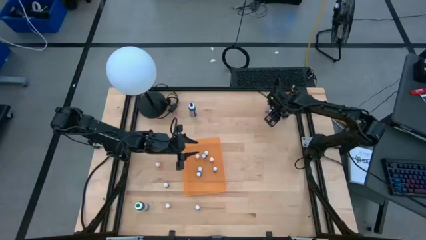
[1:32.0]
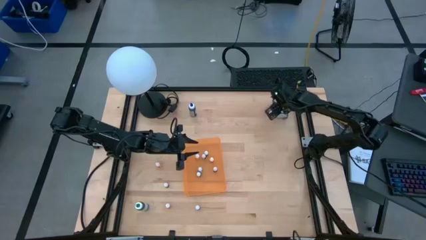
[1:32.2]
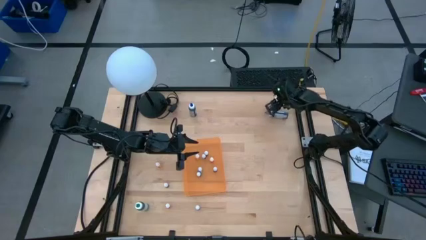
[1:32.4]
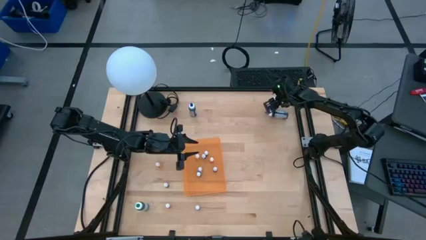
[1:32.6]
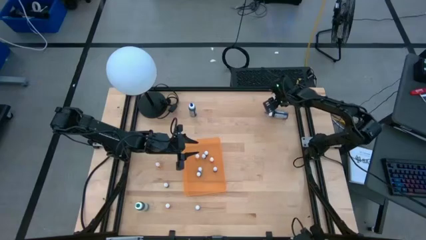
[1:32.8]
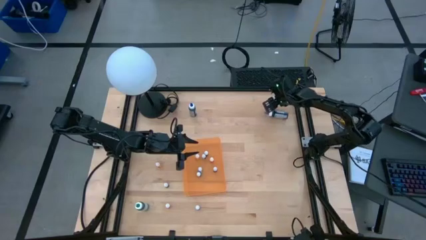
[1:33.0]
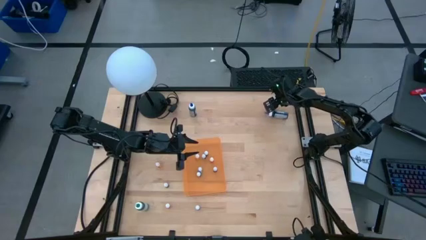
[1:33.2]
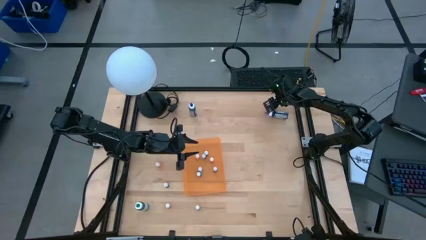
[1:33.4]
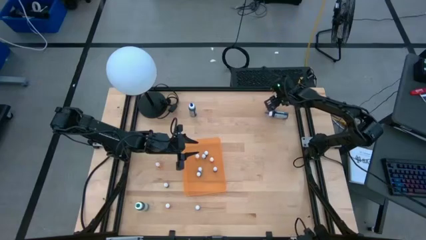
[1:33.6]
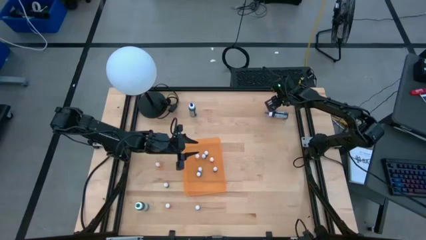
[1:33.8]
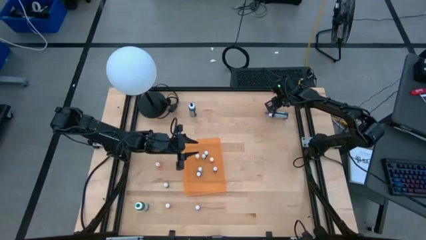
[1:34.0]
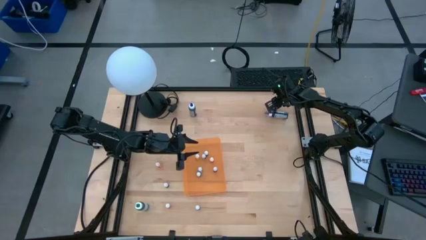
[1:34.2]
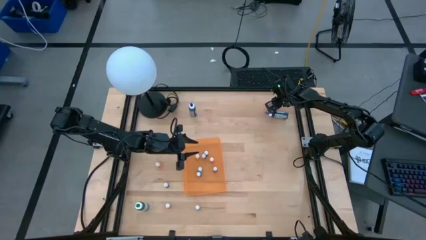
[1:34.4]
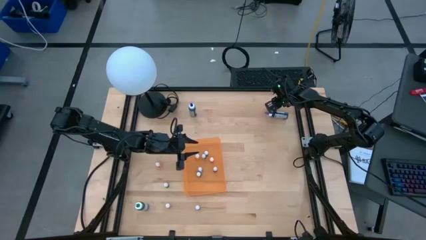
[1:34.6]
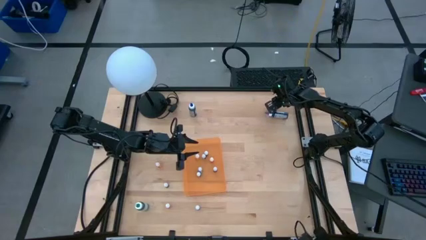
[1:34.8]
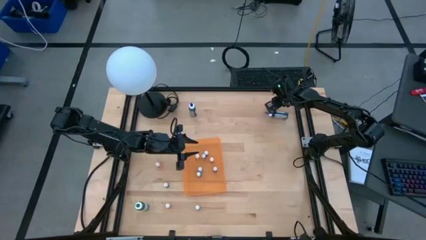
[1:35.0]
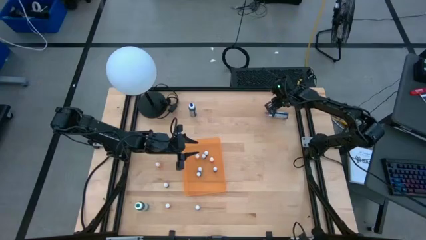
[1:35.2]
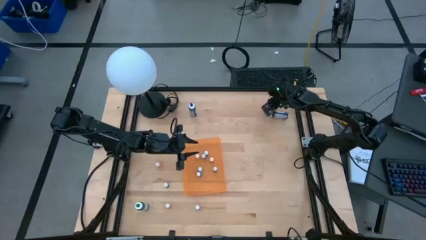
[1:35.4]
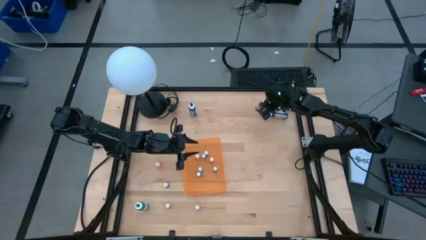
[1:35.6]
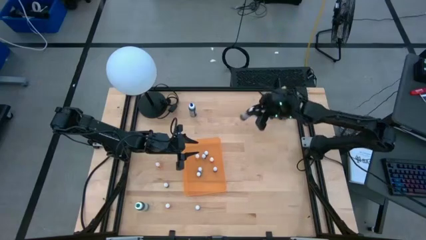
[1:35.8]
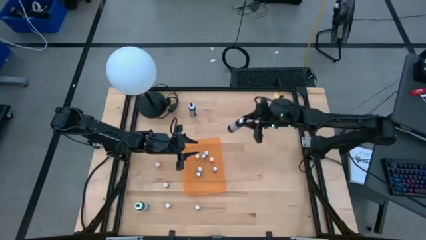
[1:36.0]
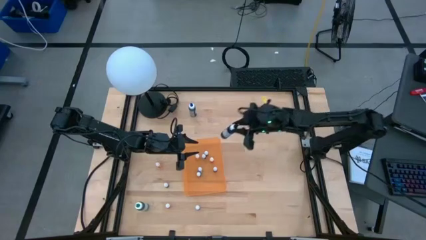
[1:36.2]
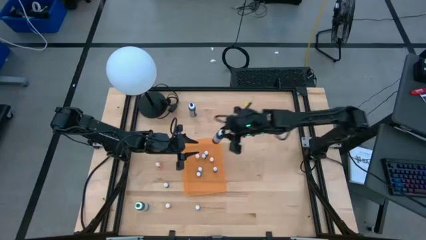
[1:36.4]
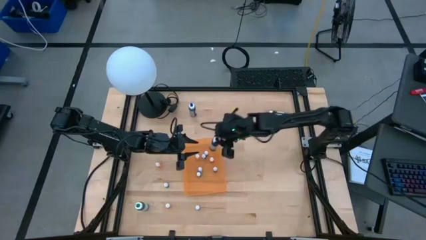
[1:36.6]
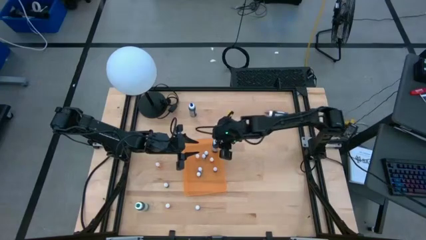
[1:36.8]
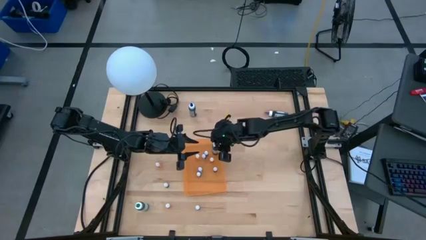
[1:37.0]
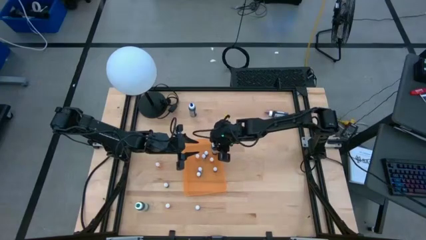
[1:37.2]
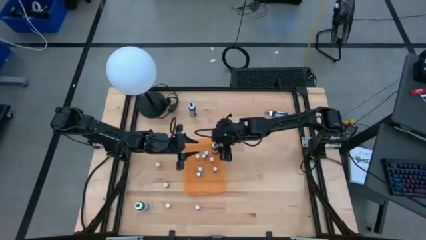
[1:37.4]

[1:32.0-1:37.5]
Task: Pick & Place food coloring
Put the large black food coloring bottle into the orange bin

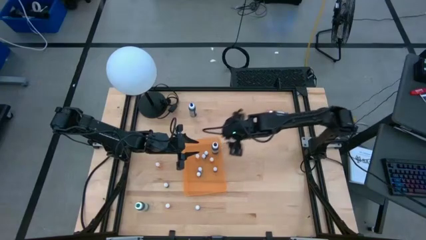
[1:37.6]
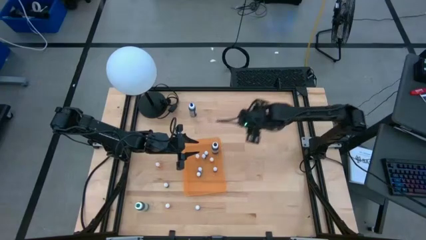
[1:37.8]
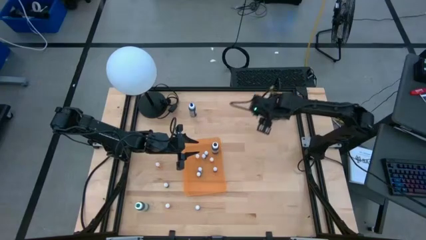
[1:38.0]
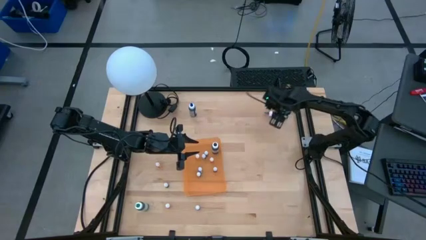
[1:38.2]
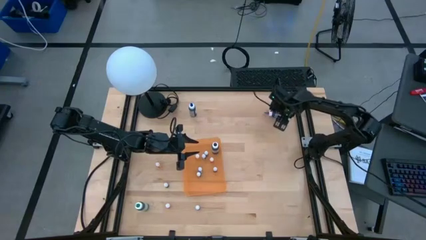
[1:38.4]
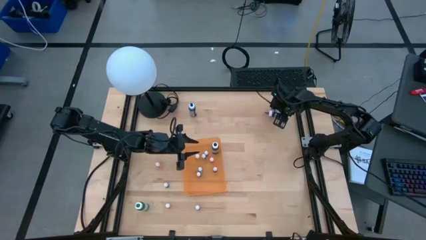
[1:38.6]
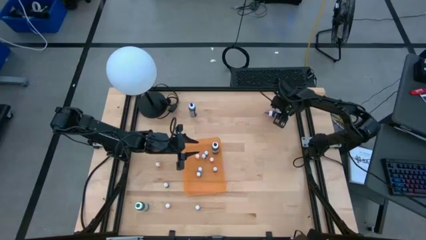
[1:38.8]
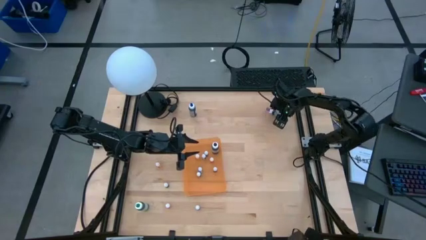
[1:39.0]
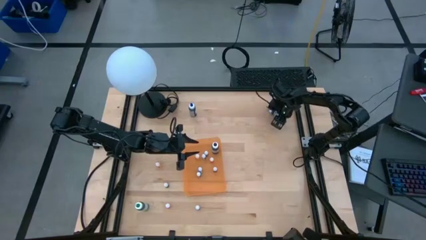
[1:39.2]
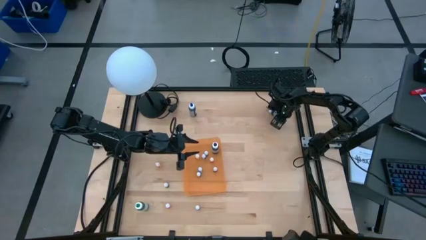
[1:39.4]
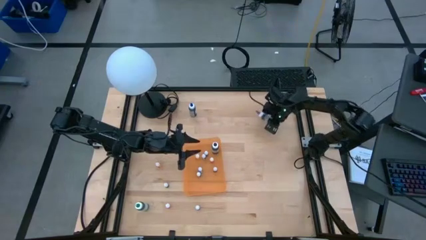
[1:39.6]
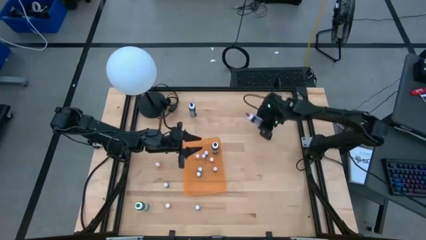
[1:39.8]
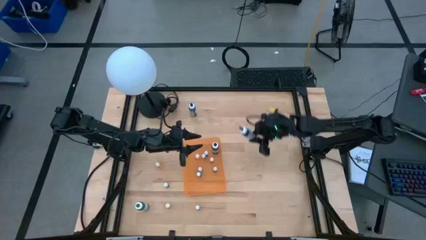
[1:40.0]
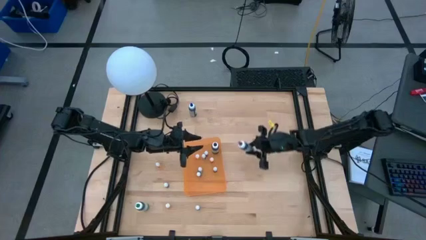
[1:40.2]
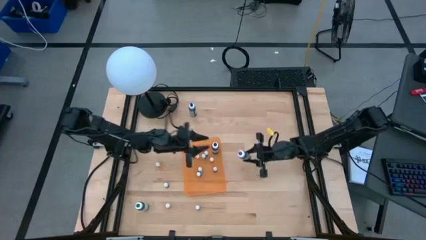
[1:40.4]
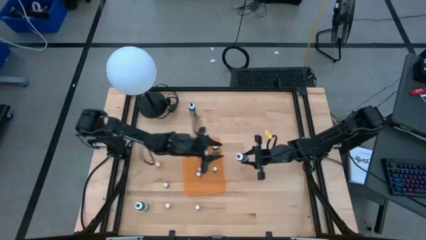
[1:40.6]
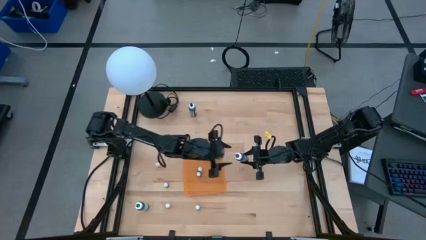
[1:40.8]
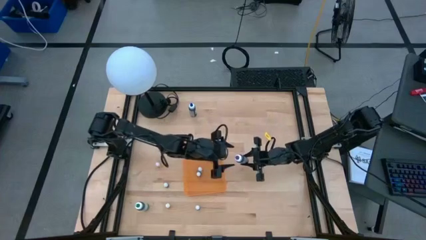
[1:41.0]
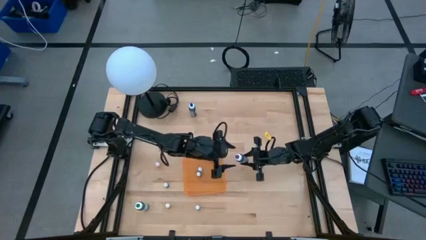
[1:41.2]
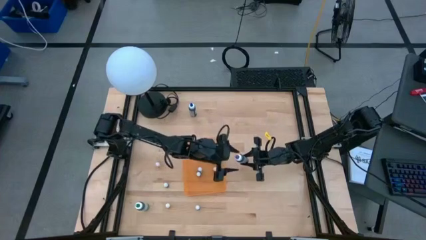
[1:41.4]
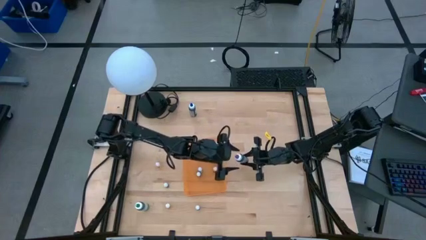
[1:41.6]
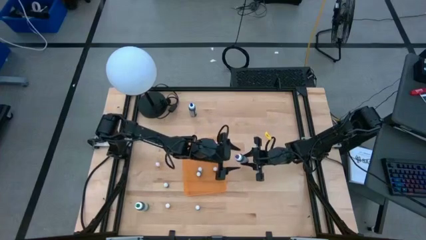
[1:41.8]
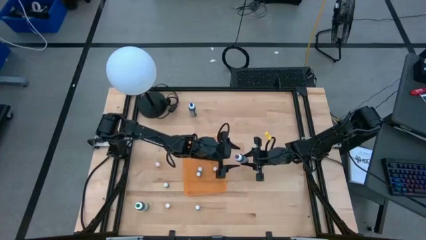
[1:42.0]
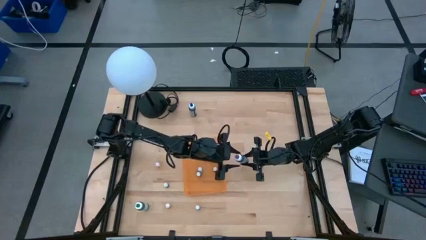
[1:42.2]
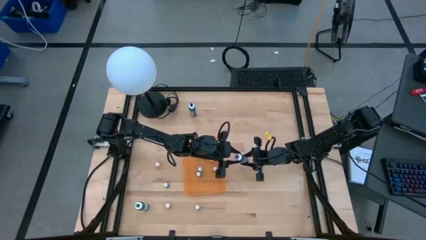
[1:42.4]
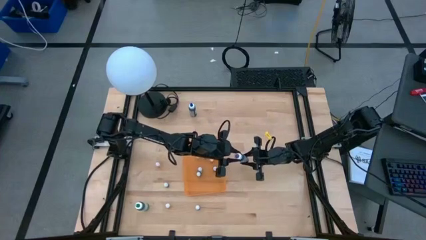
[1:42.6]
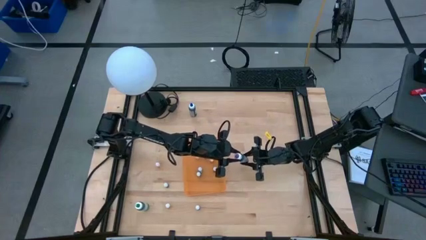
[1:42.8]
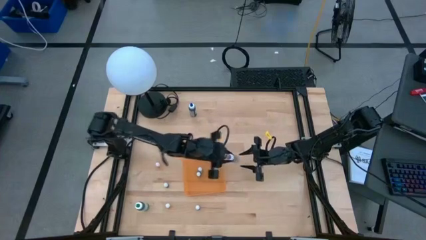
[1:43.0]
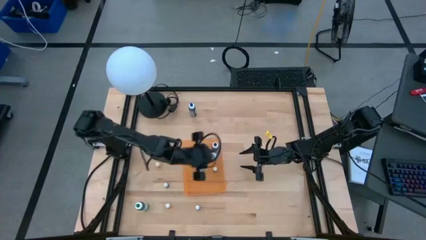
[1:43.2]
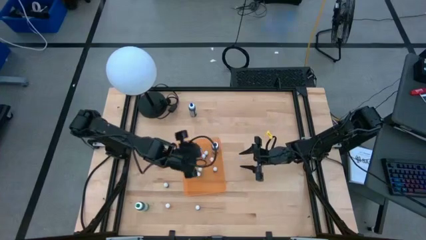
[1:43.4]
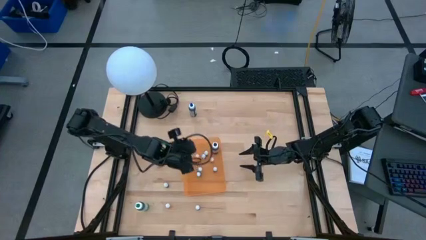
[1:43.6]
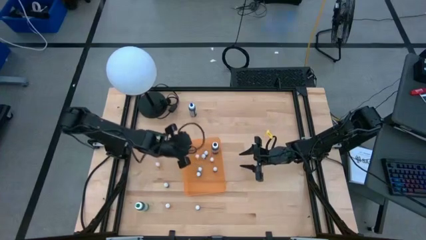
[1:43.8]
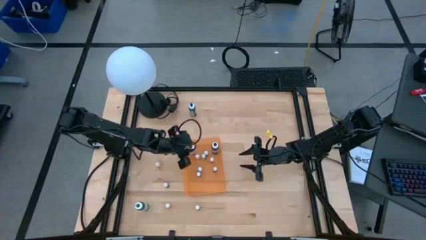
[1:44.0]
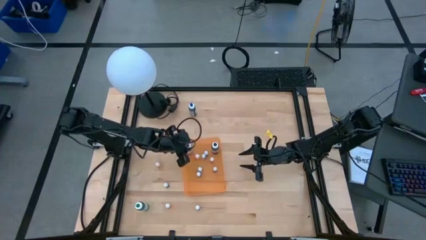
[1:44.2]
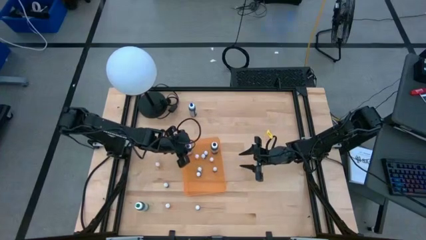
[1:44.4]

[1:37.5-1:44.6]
Put the large violet food coloring bottle into the orange bin

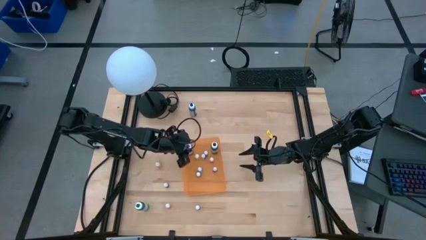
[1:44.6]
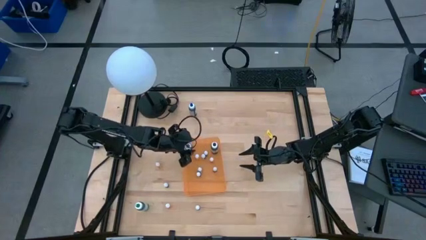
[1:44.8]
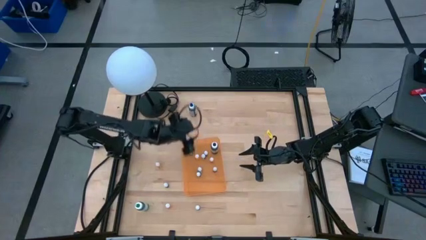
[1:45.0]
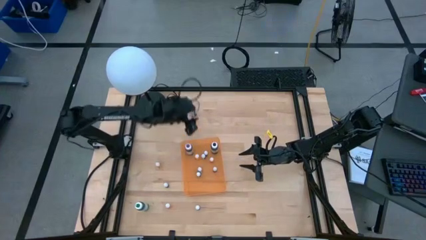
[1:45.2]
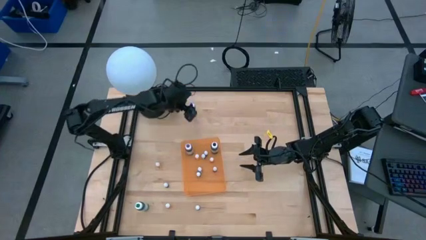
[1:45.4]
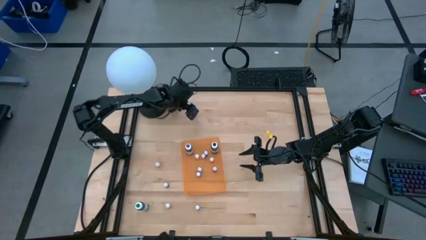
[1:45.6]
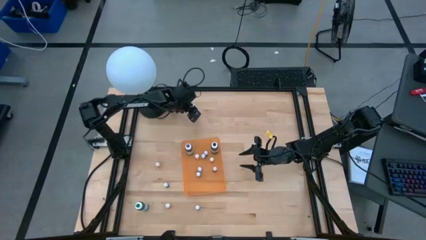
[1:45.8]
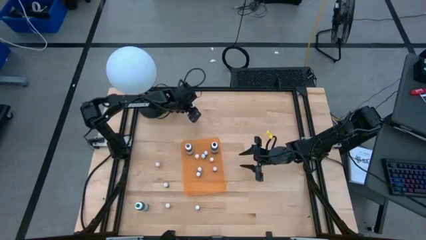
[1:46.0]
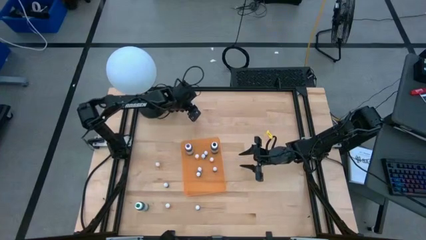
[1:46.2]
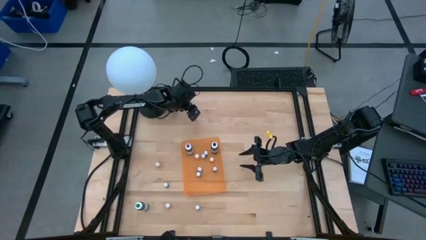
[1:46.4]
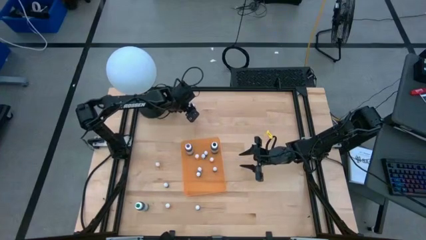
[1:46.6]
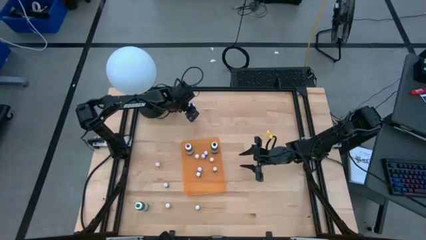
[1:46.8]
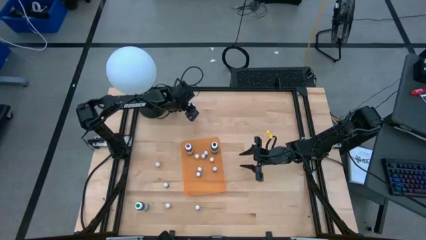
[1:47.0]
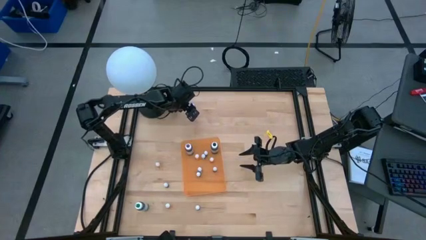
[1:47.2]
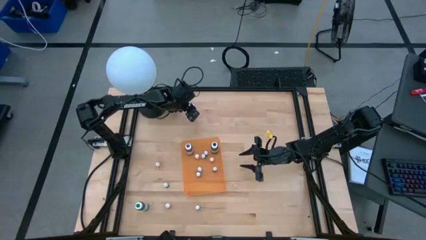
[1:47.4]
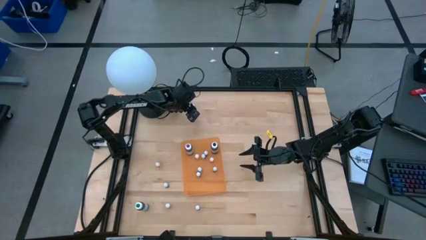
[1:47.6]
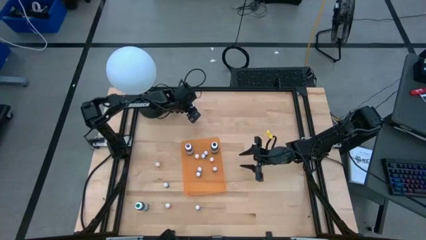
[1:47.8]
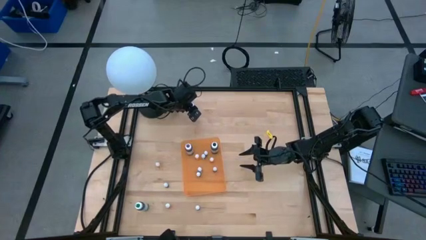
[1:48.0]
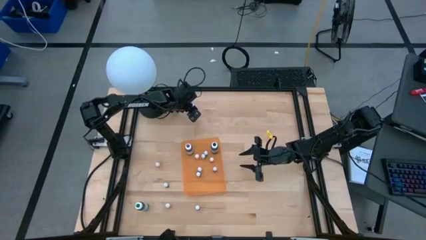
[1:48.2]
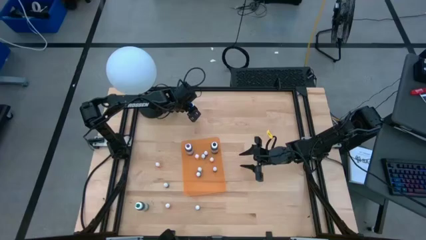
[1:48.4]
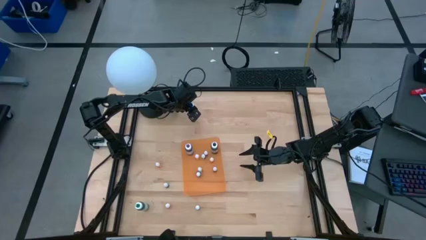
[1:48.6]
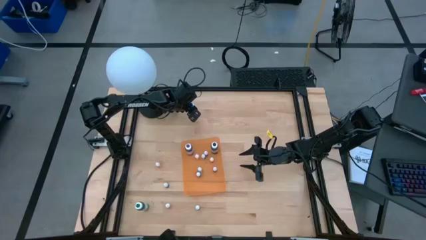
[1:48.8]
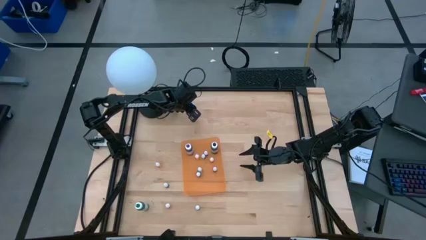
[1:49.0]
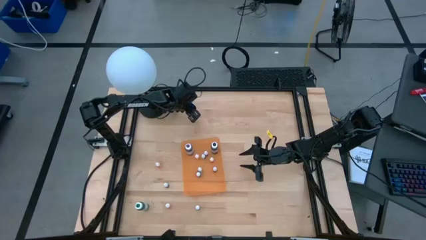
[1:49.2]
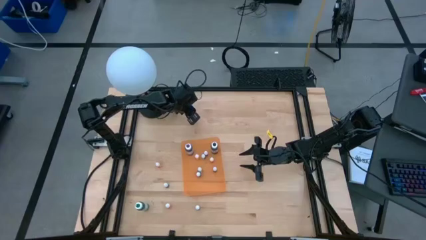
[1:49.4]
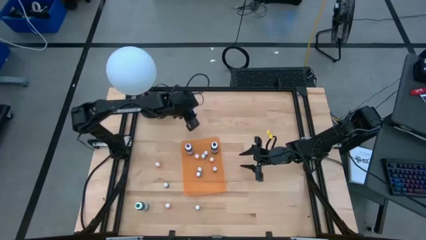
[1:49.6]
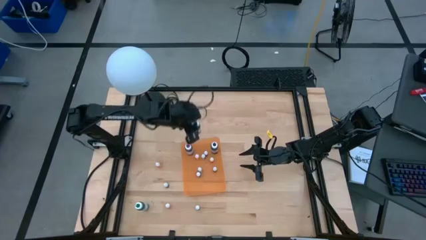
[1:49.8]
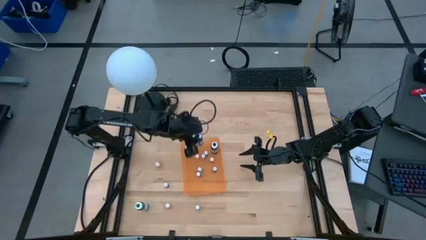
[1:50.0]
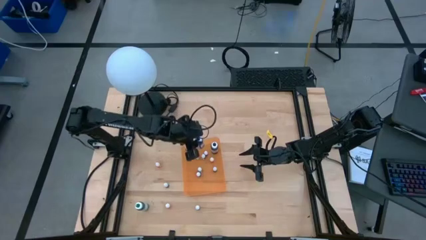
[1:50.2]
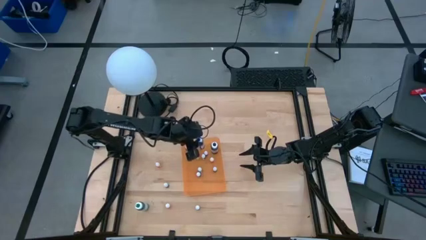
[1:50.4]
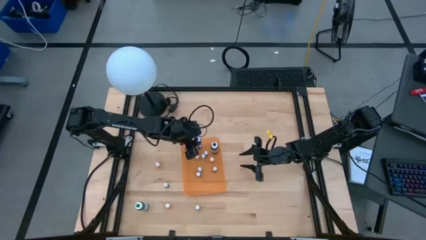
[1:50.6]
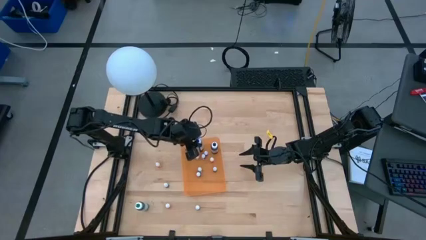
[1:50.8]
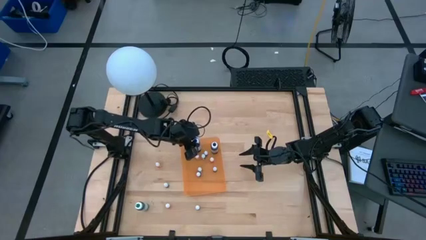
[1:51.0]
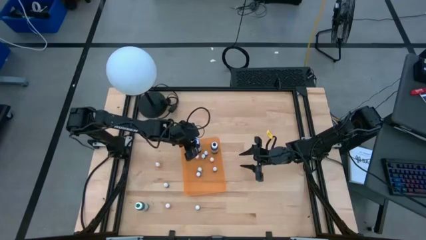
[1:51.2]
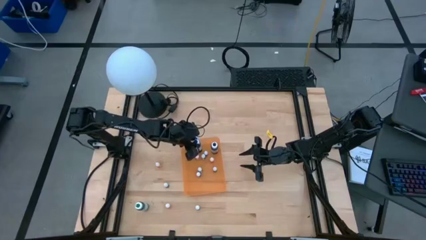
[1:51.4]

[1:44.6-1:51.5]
Put the large blue food coloring bottle into the orange bin
